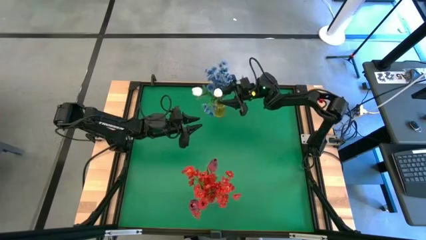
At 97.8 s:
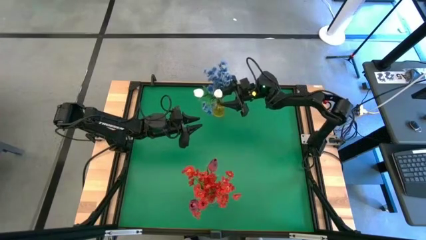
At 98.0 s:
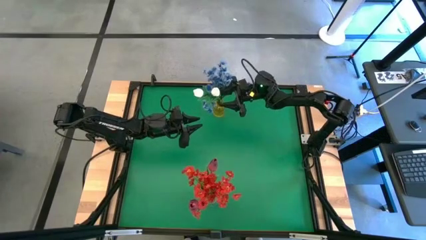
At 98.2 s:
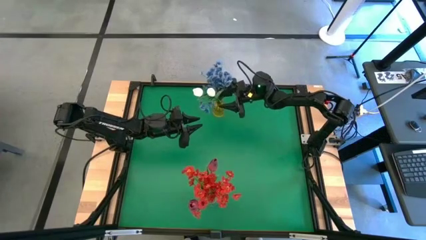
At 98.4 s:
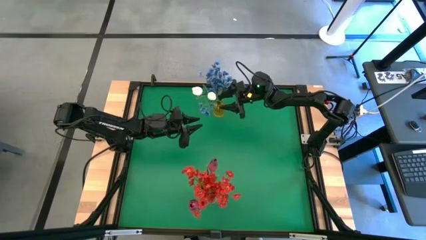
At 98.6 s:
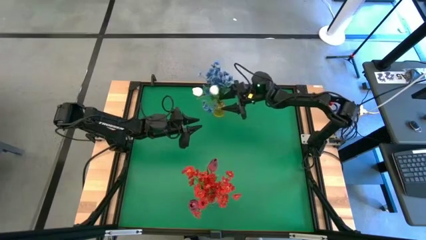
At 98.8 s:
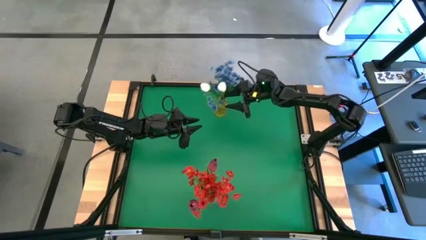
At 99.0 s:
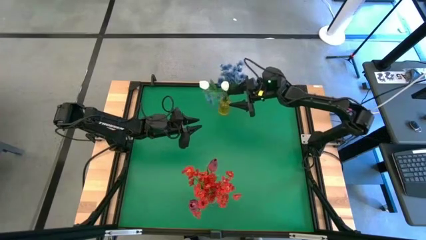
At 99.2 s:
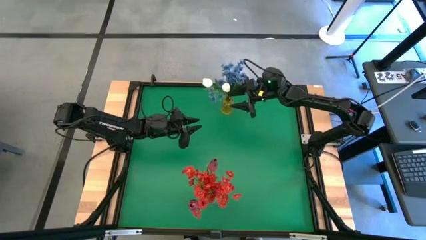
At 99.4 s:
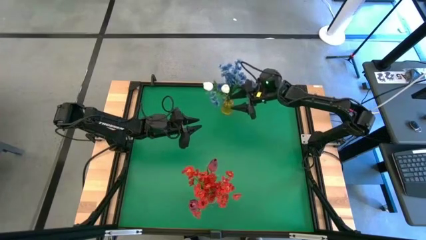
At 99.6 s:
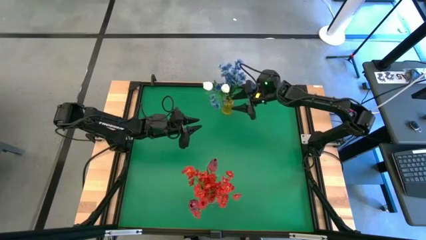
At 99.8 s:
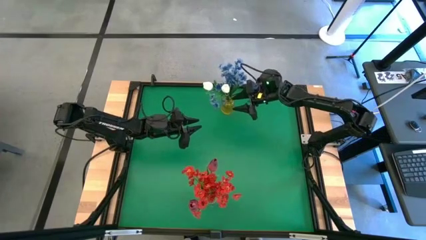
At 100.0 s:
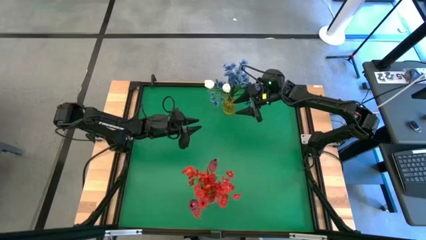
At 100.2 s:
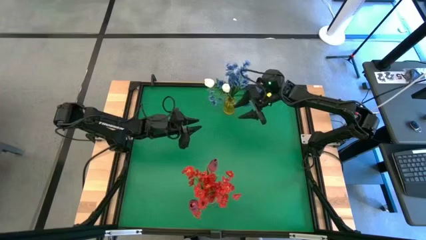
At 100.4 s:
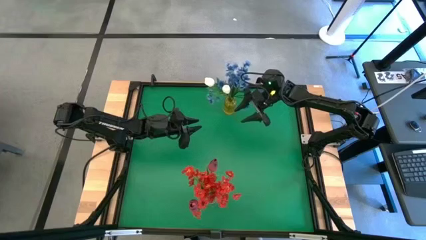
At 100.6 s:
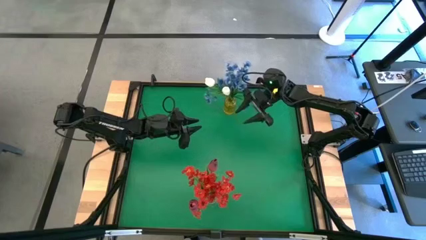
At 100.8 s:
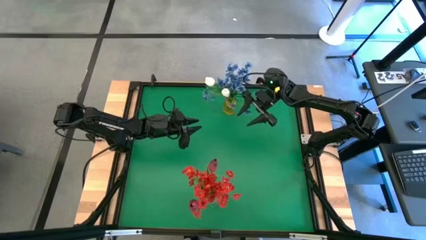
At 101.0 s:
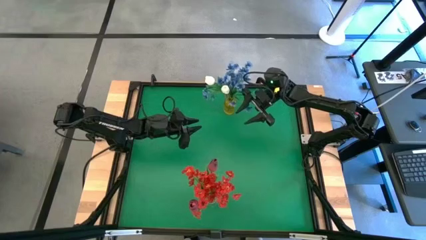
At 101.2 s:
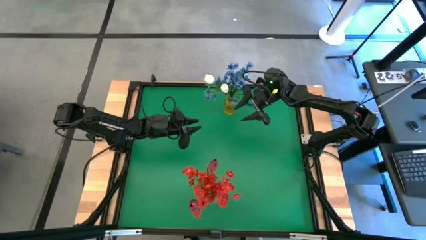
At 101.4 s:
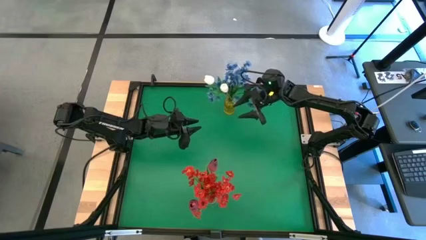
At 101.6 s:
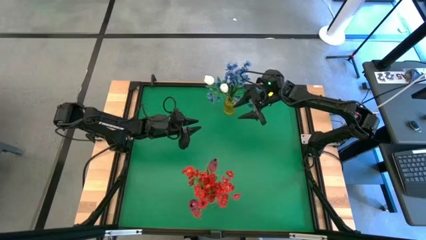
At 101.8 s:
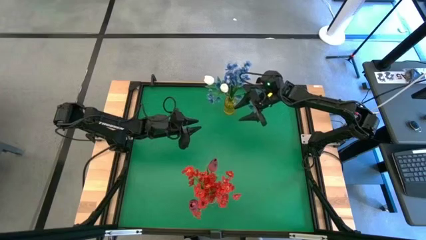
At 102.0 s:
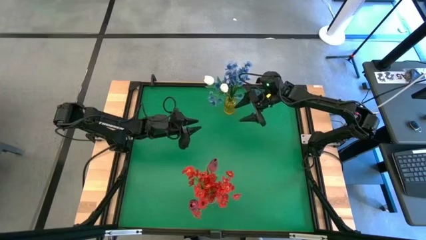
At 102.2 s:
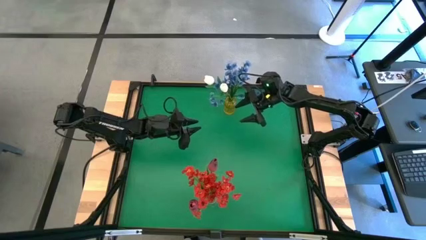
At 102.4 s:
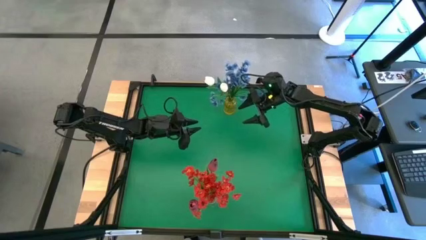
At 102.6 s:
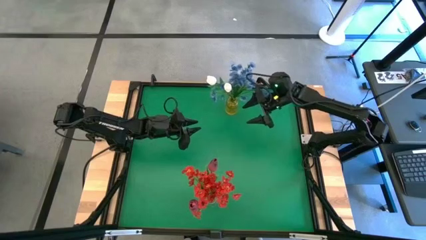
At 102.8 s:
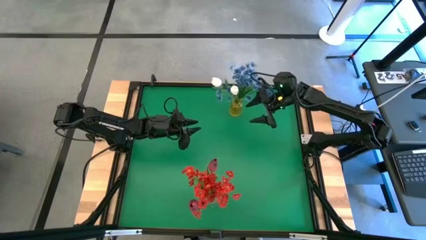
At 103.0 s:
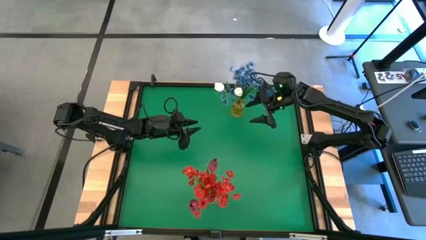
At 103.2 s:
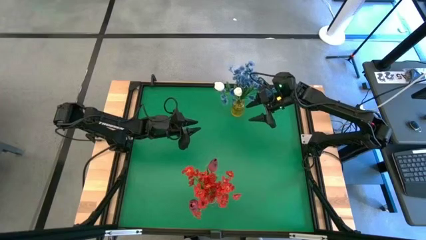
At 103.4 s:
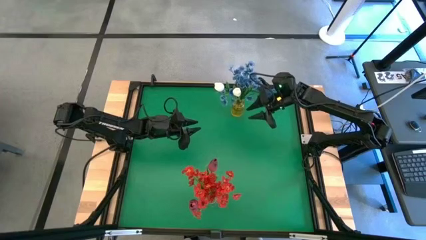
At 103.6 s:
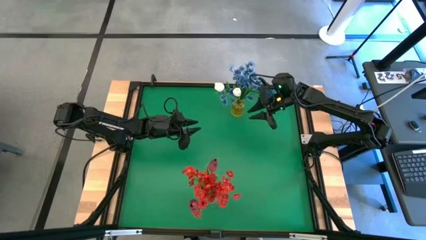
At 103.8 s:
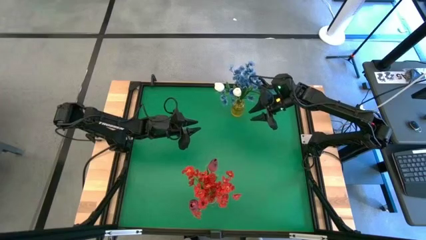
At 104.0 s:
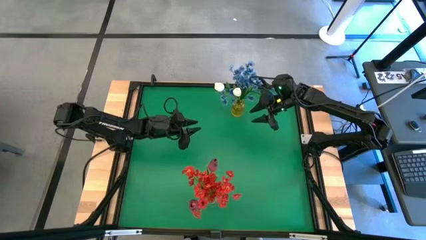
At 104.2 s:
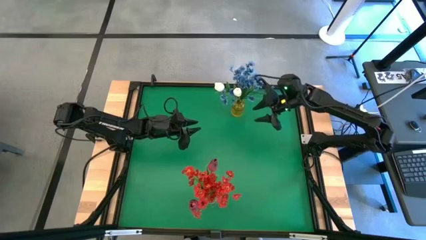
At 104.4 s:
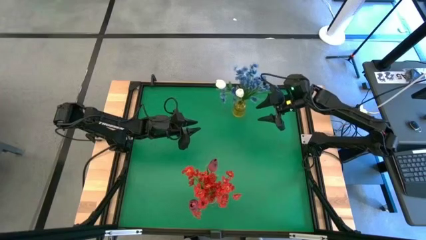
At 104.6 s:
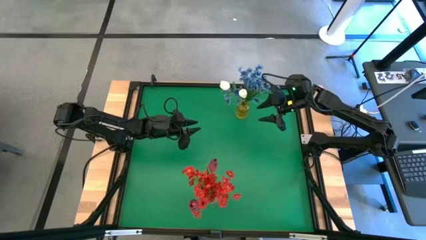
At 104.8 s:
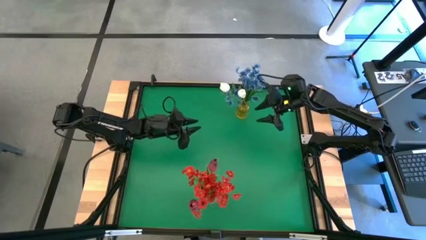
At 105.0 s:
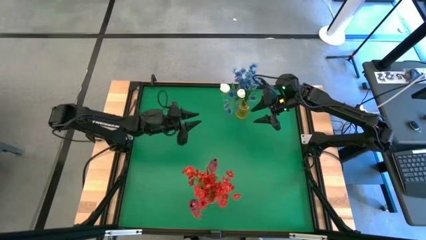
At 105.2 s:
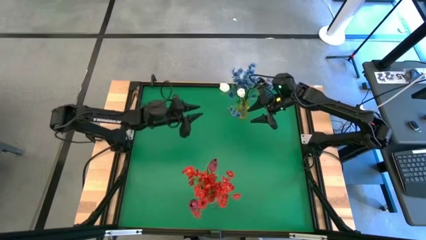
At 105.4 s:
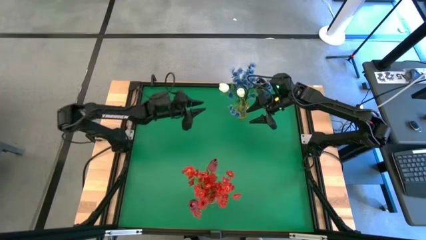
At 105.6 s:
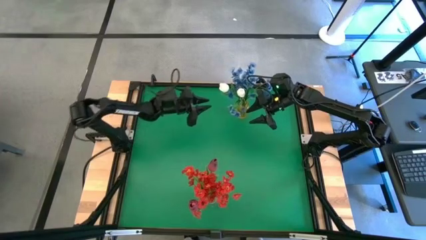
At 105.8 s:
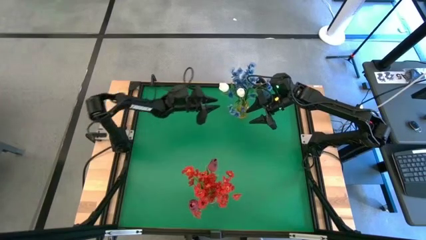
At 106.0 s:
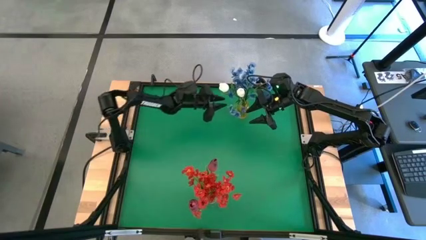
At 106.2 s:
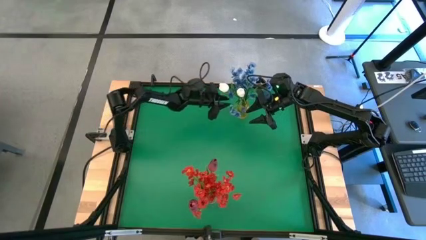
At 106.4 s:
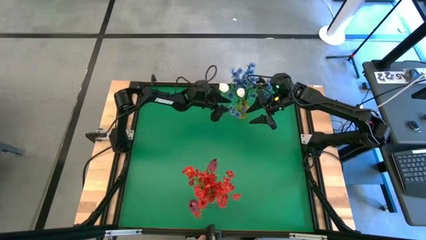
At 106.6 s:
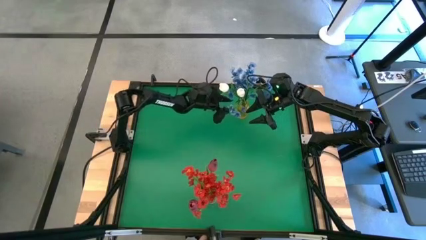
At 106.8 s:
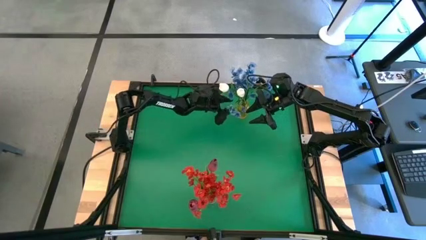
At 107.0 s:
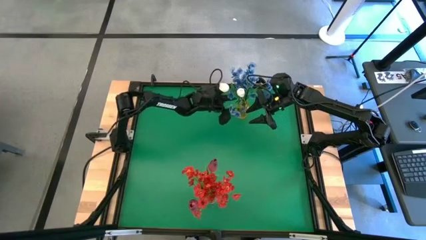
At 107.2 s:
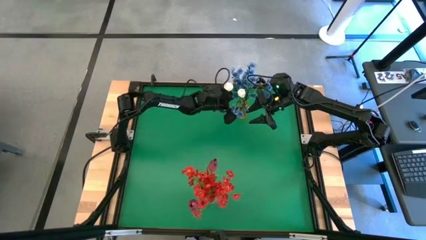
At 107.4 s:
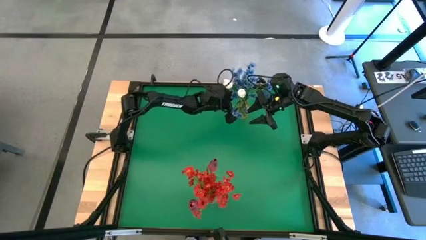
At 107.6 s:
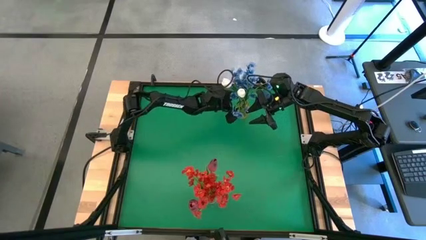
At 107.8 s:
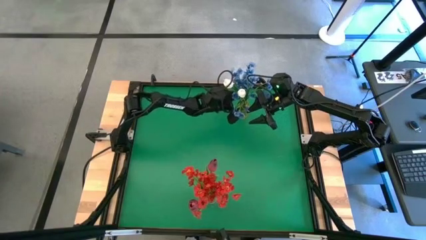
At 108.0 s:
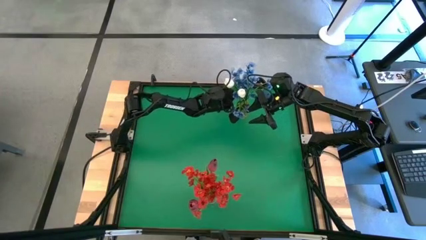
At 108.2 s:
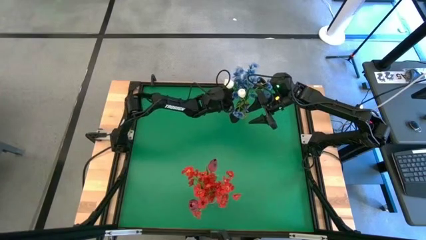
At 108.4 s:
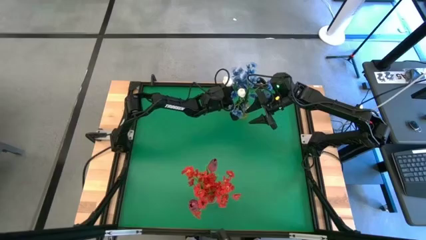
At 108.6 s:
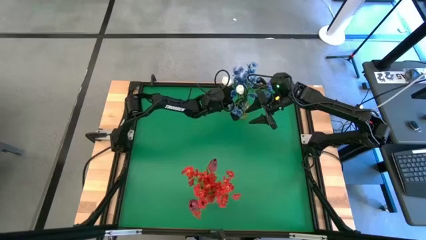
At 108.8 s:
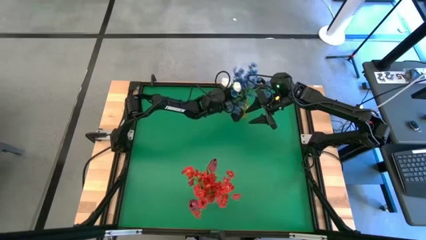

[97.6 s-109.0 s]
Task: Sort flowers into vase by color
Return to Home Position

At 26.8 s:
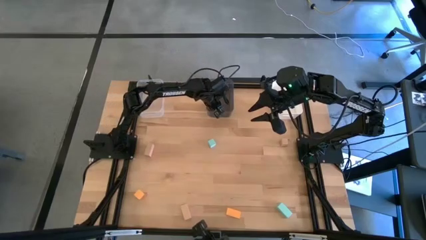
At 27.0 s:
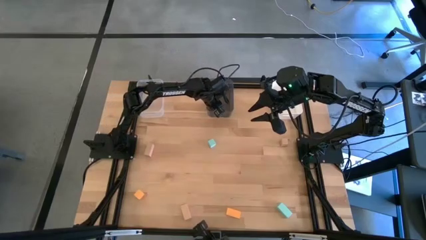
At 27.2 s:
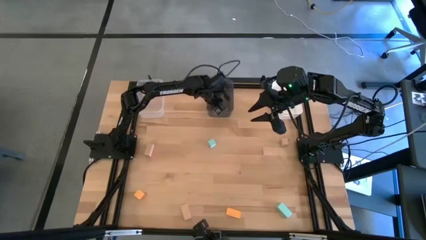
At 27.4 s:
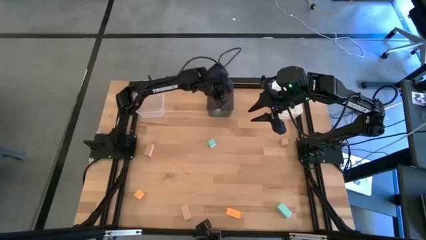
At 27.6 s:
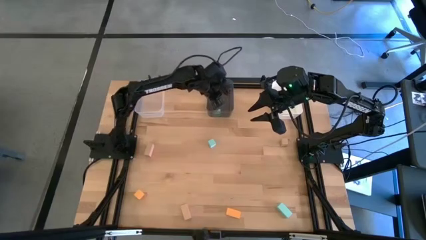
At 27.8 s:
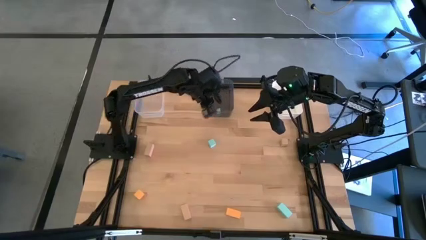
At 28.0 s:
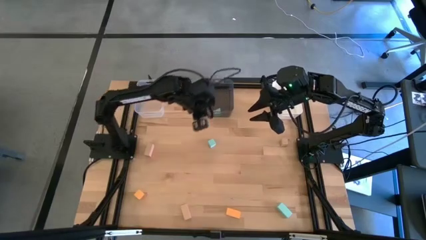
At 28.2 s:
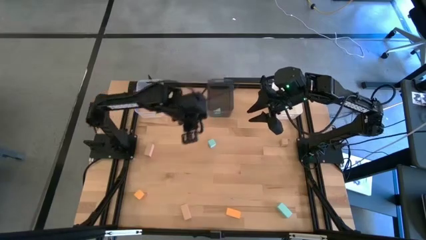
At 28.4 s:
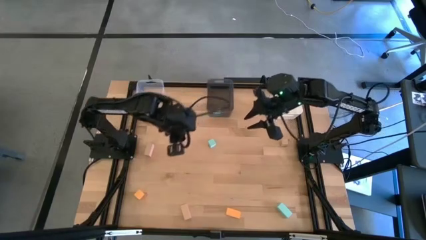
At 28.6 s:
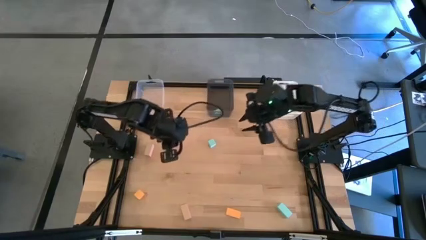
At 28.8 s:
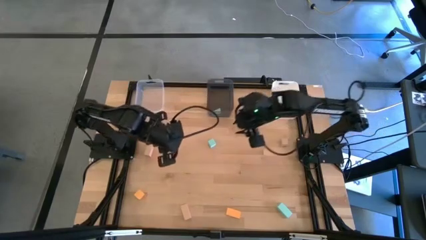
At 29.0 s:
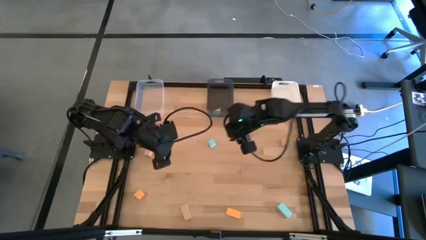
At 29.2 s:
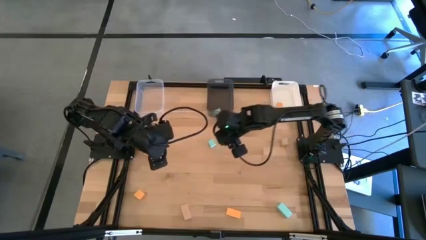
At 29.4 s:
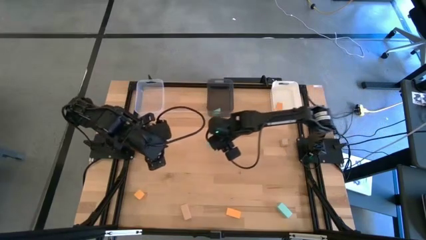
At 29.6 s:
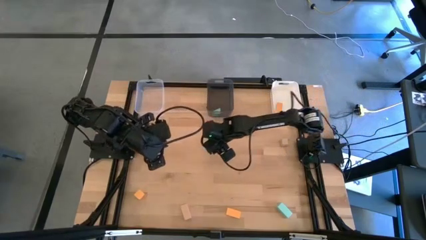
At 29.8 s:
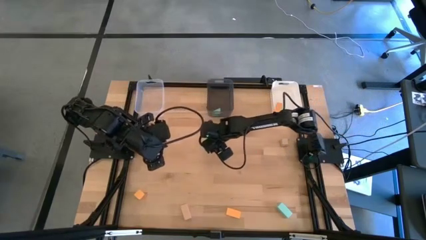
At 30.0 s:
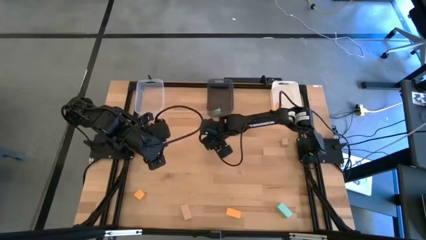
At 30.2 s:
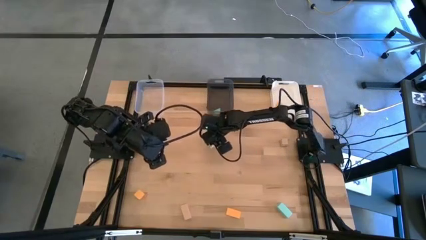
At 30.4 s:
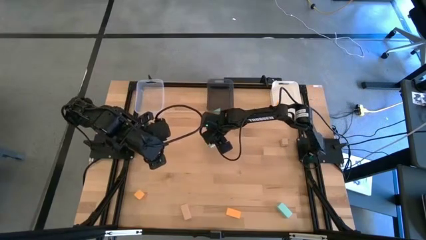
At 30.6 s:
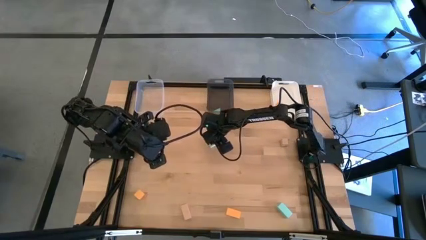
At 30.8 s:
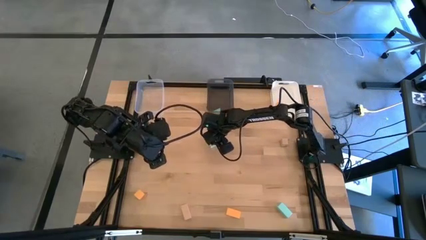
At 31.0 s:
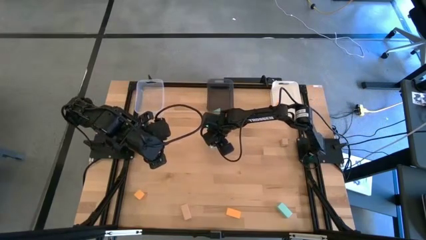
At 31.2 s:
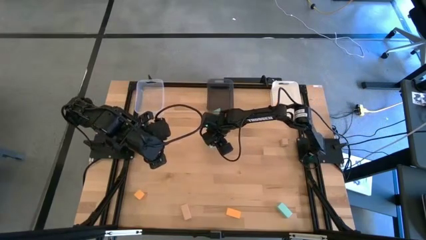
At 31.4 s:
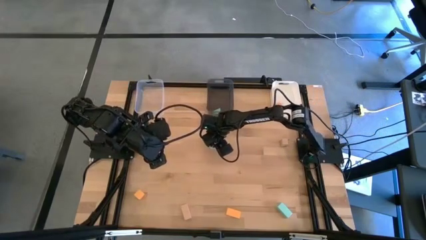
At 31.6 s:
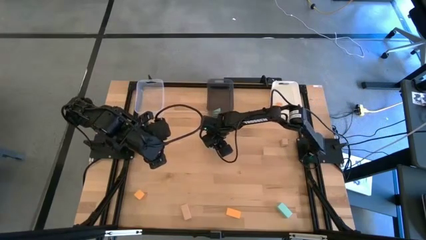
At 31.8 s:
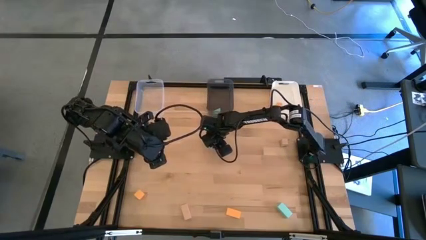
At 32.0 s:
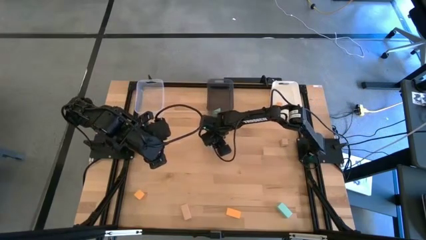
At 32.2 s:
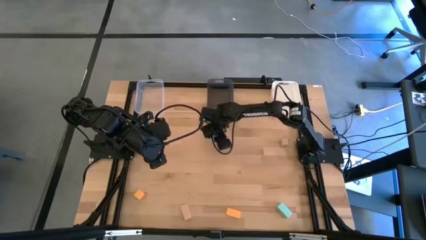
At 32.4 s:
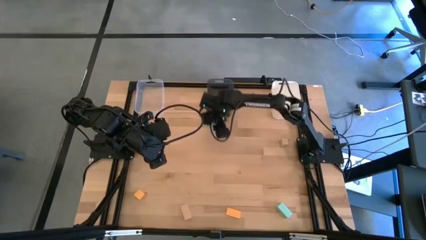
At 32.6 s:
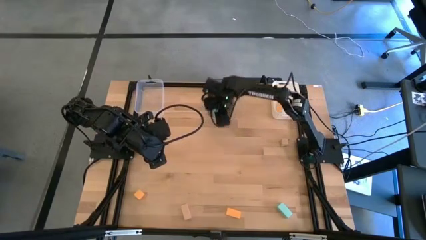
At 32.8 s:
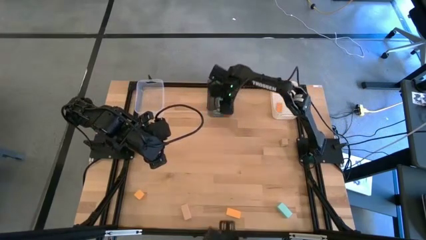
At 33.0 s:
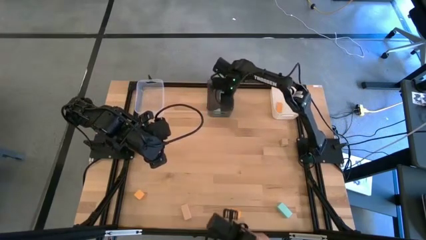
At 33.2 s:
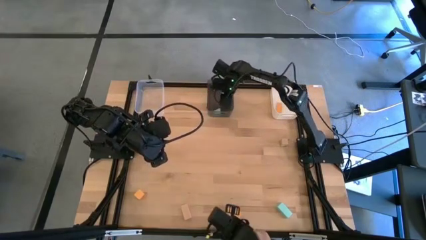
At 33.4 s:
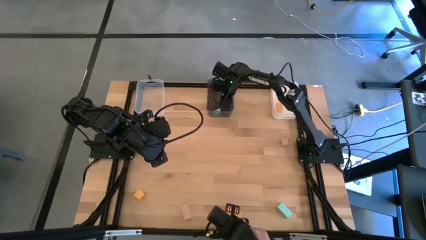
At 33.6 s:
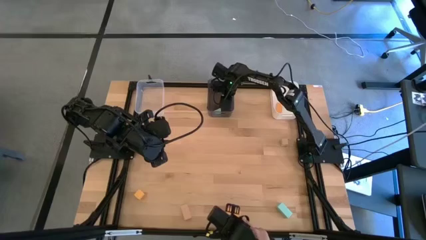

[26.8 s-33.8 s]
Task: Sort & place blocks by color
Put the top blue block into the black bin
